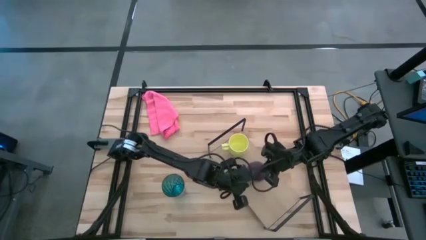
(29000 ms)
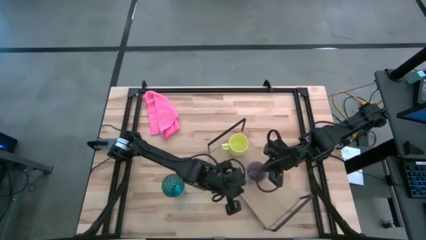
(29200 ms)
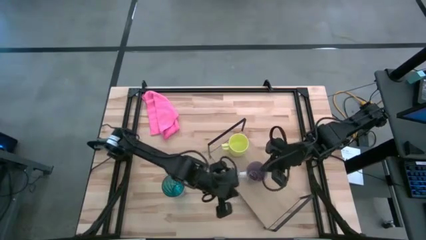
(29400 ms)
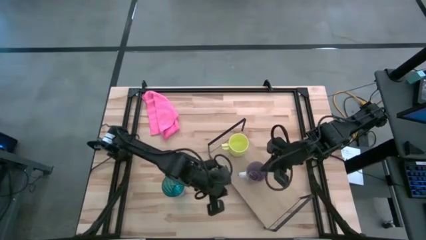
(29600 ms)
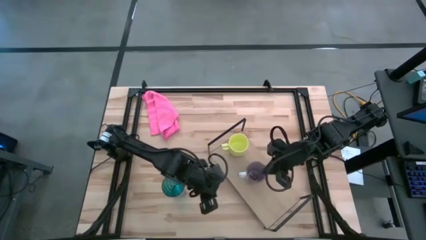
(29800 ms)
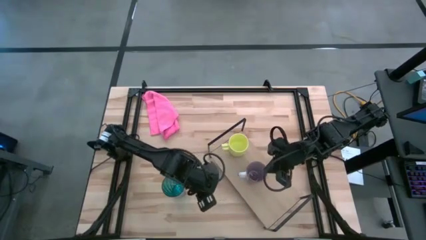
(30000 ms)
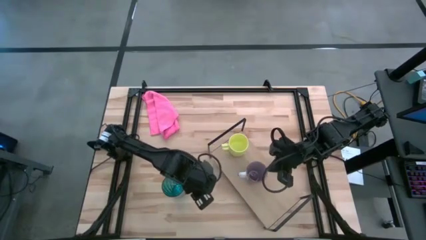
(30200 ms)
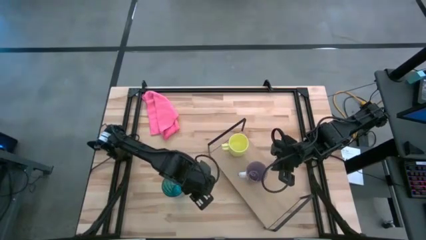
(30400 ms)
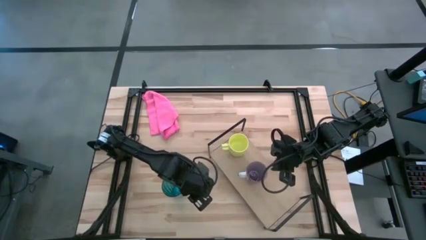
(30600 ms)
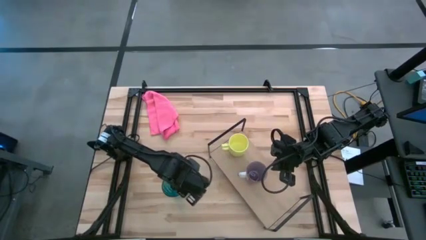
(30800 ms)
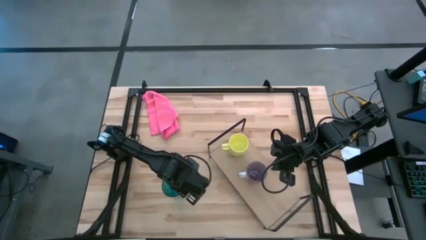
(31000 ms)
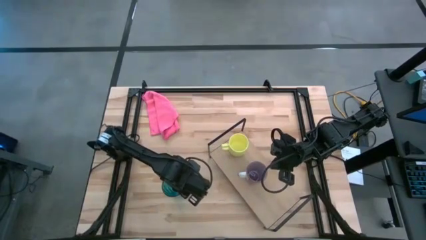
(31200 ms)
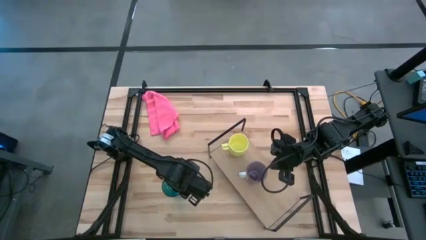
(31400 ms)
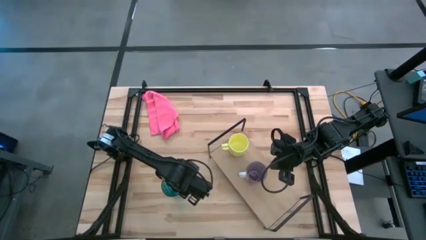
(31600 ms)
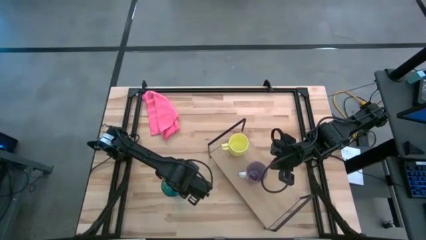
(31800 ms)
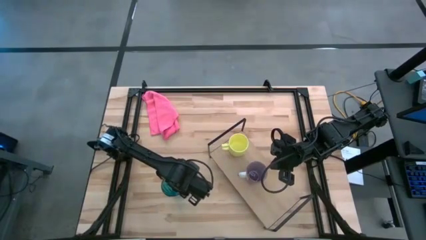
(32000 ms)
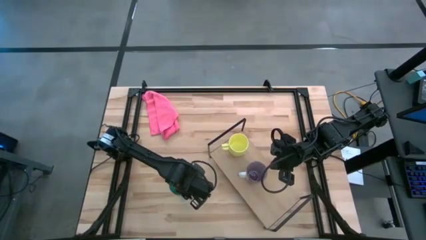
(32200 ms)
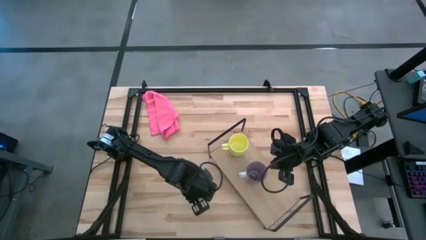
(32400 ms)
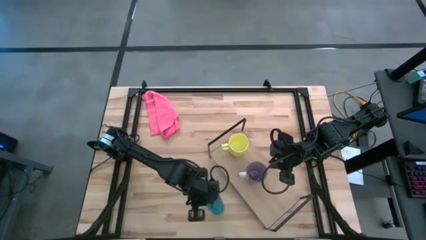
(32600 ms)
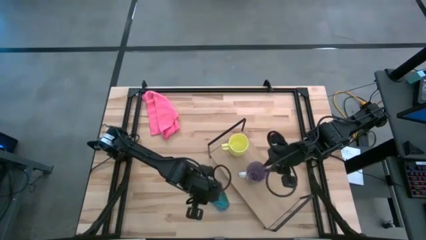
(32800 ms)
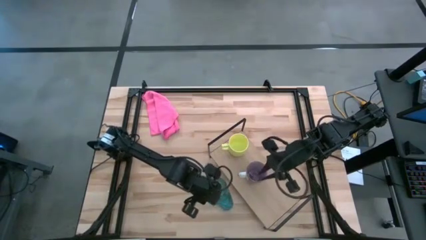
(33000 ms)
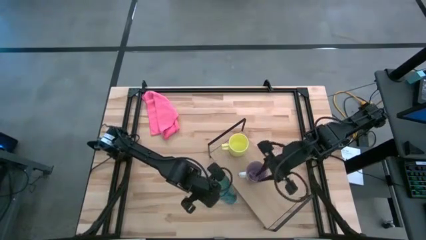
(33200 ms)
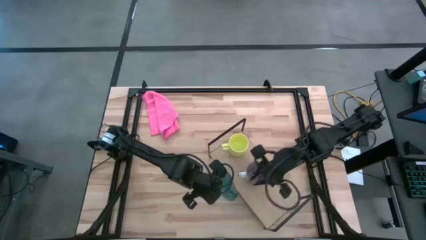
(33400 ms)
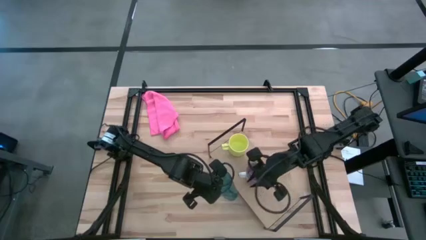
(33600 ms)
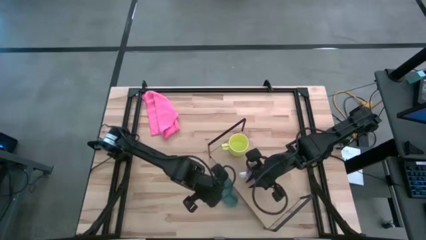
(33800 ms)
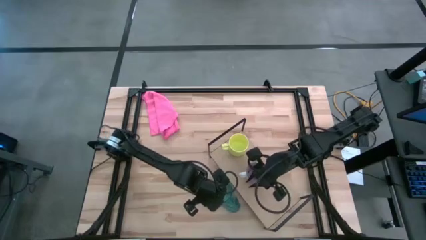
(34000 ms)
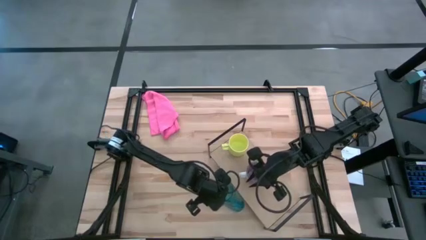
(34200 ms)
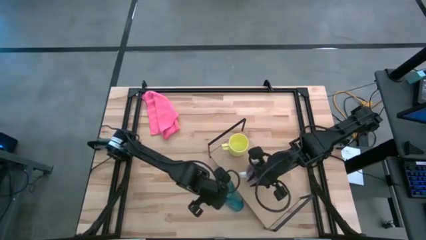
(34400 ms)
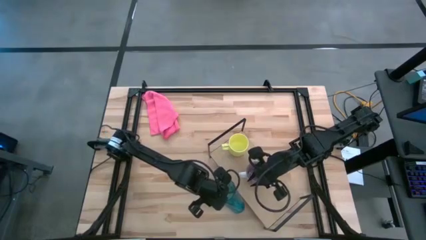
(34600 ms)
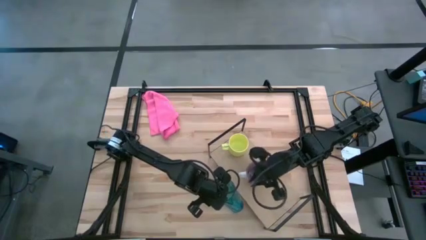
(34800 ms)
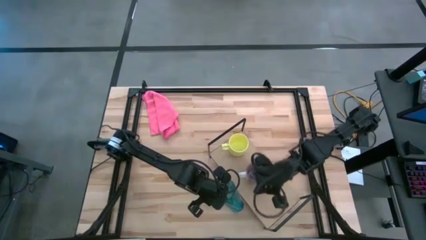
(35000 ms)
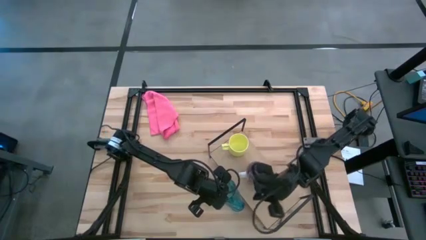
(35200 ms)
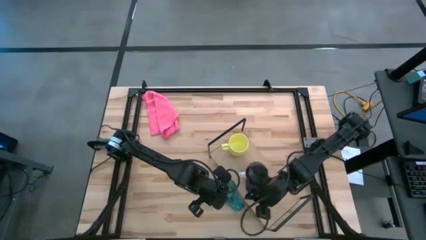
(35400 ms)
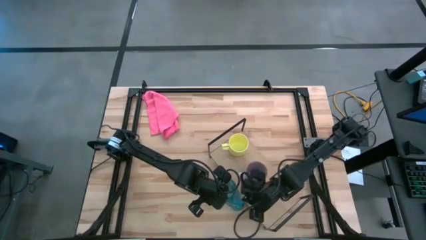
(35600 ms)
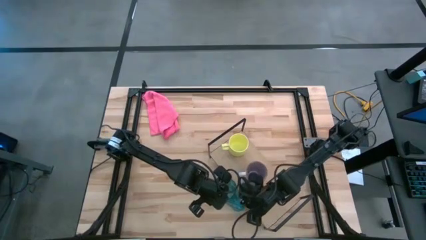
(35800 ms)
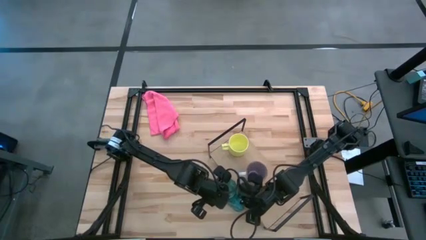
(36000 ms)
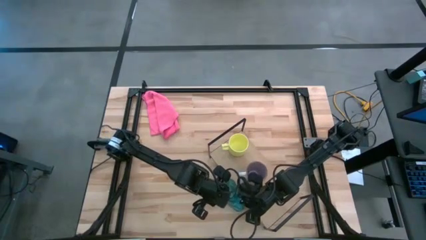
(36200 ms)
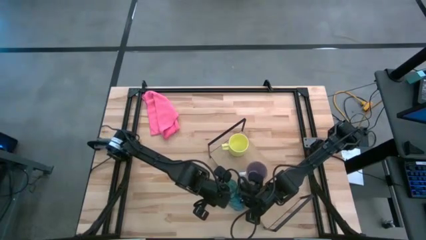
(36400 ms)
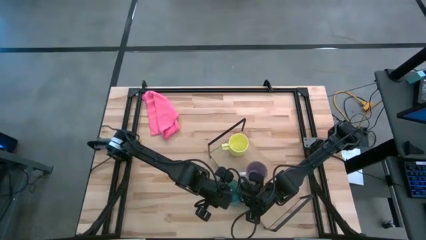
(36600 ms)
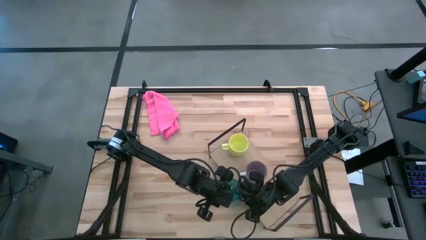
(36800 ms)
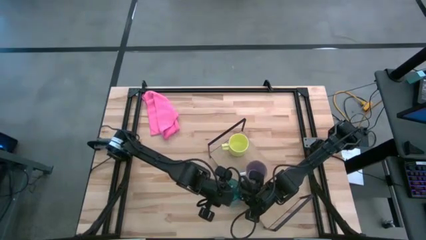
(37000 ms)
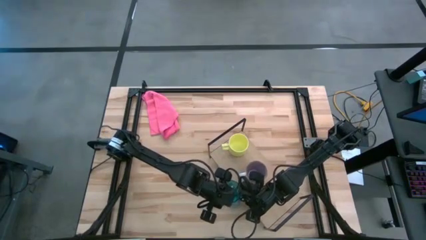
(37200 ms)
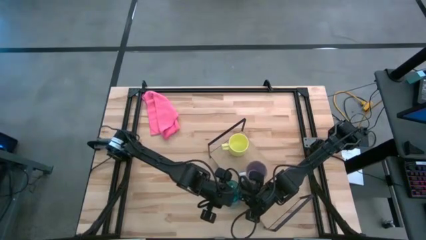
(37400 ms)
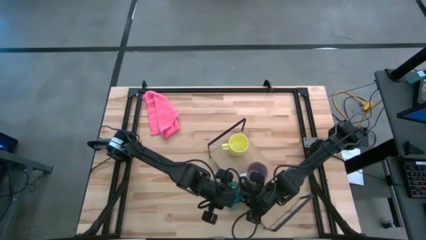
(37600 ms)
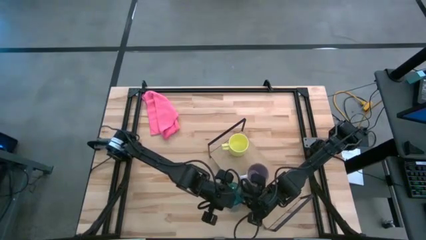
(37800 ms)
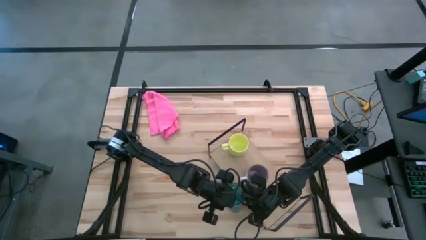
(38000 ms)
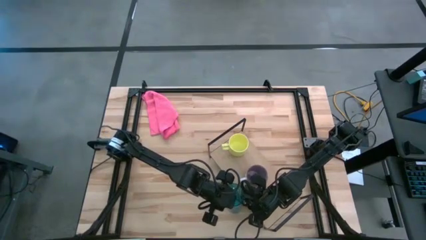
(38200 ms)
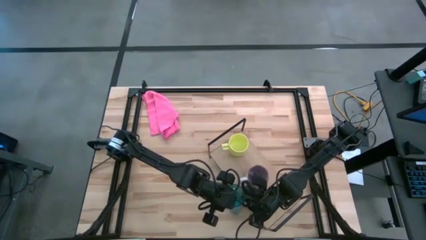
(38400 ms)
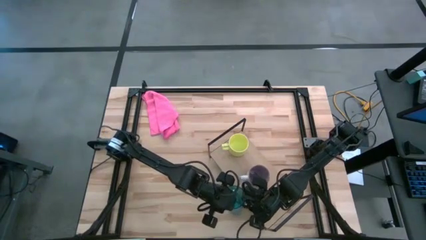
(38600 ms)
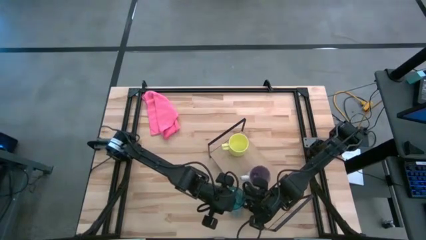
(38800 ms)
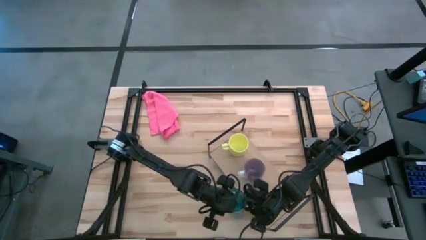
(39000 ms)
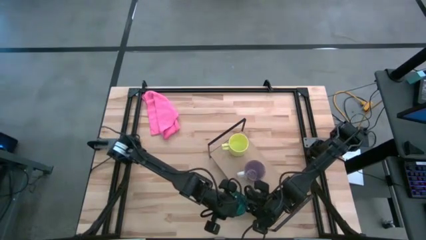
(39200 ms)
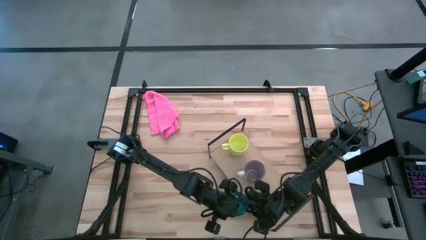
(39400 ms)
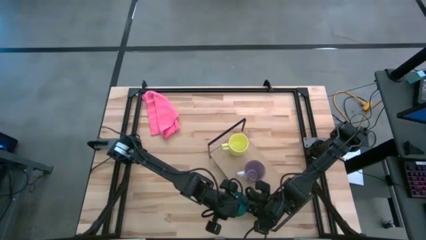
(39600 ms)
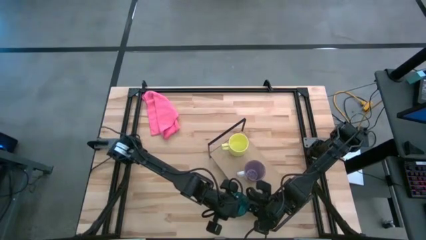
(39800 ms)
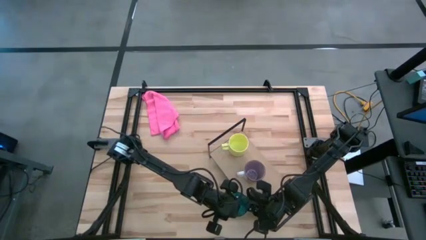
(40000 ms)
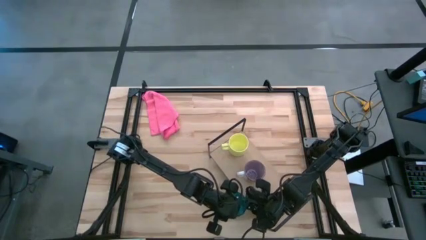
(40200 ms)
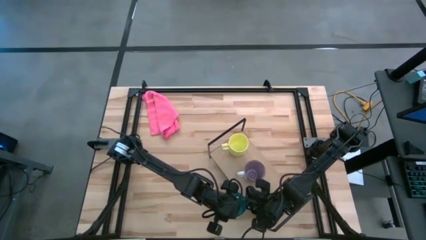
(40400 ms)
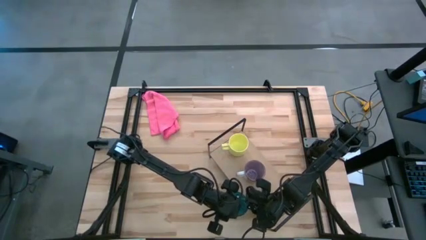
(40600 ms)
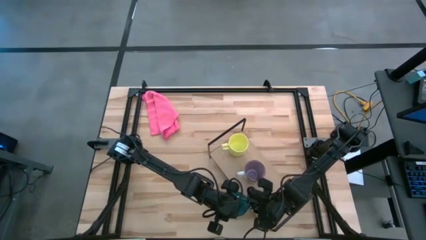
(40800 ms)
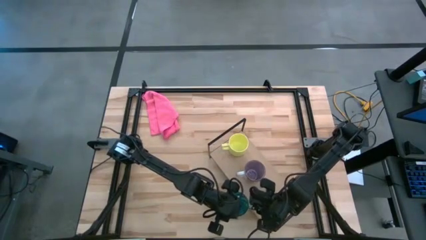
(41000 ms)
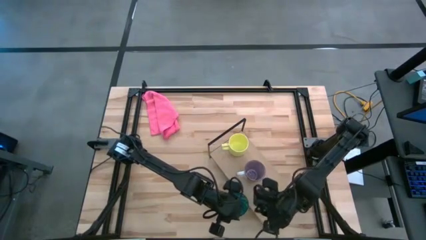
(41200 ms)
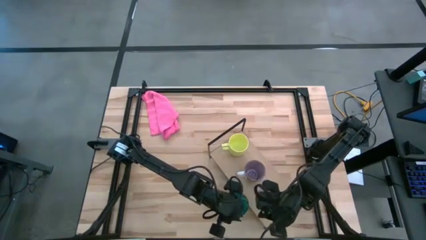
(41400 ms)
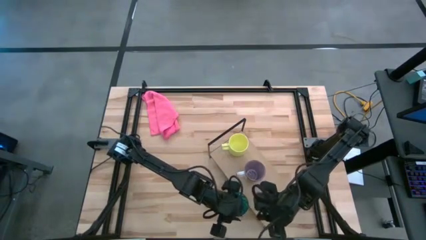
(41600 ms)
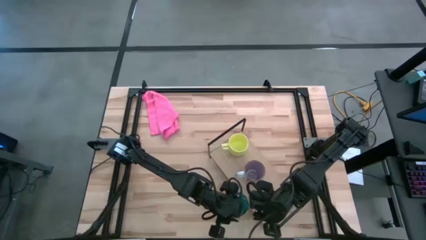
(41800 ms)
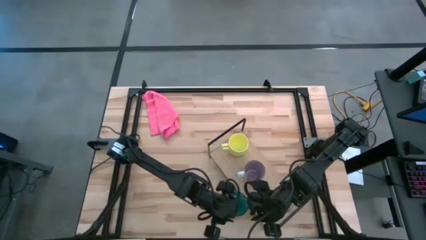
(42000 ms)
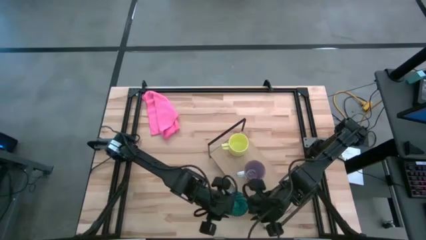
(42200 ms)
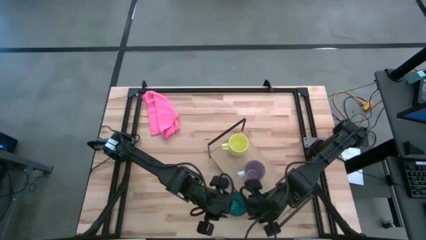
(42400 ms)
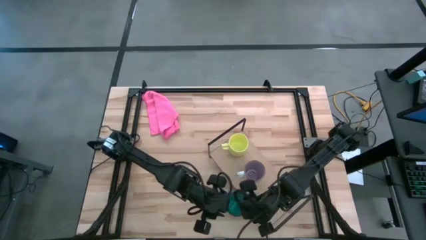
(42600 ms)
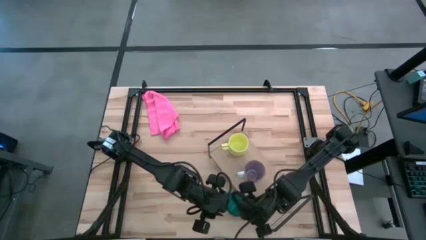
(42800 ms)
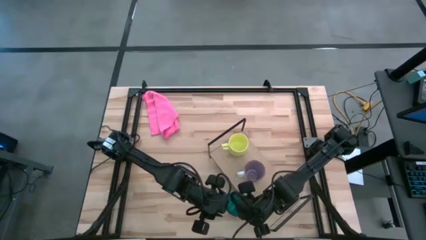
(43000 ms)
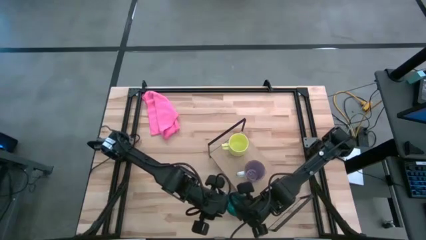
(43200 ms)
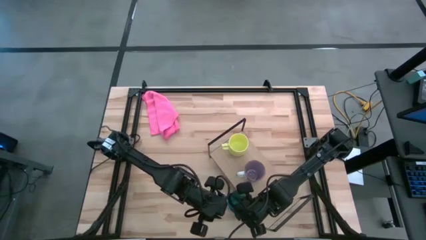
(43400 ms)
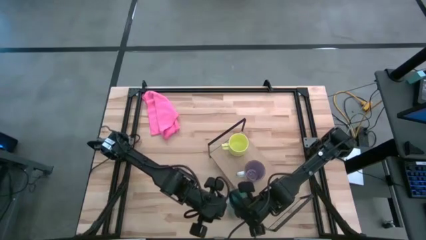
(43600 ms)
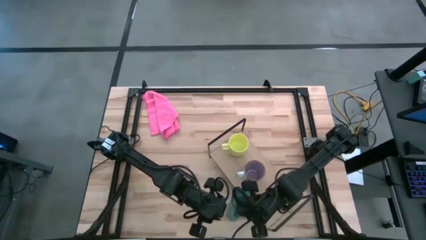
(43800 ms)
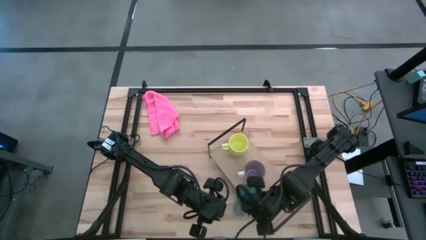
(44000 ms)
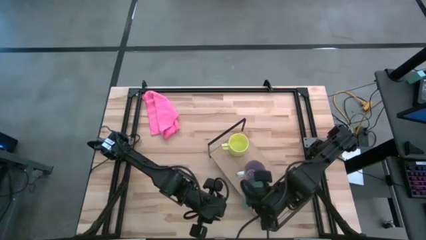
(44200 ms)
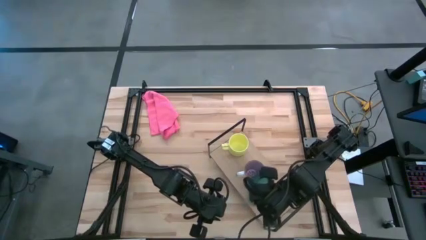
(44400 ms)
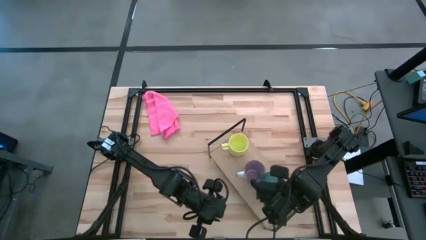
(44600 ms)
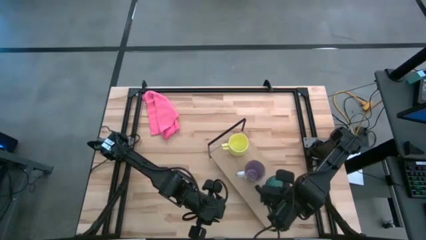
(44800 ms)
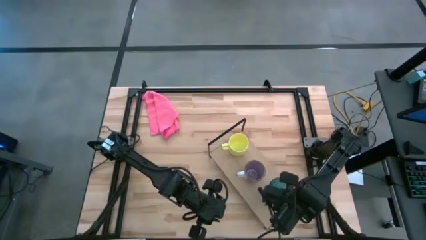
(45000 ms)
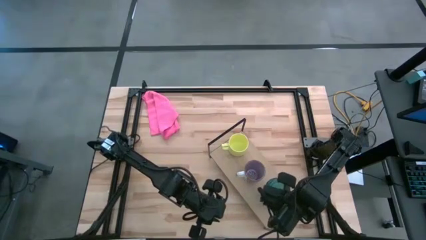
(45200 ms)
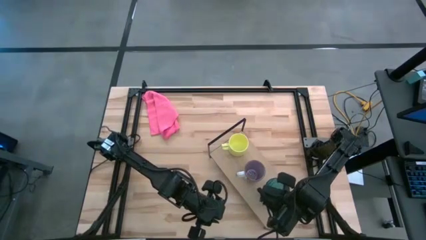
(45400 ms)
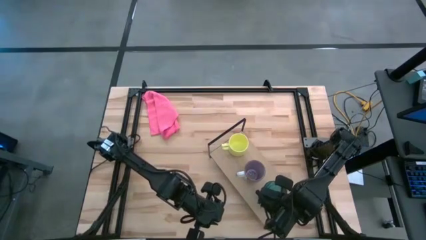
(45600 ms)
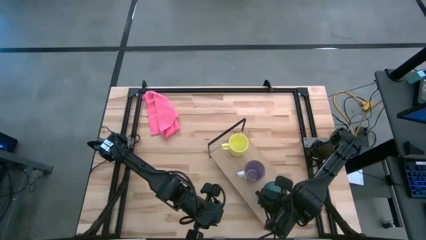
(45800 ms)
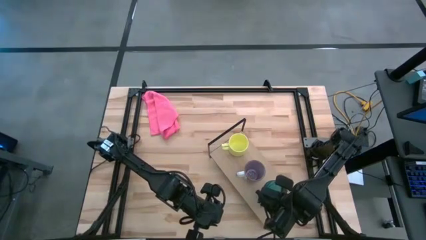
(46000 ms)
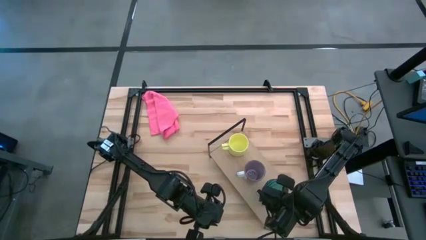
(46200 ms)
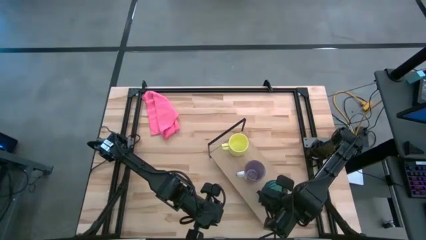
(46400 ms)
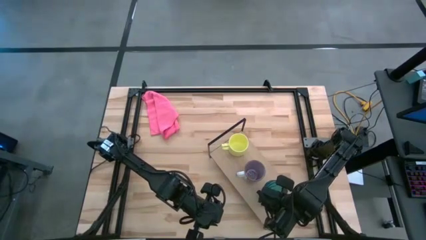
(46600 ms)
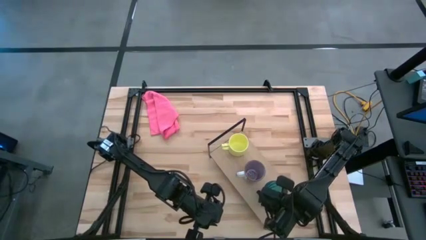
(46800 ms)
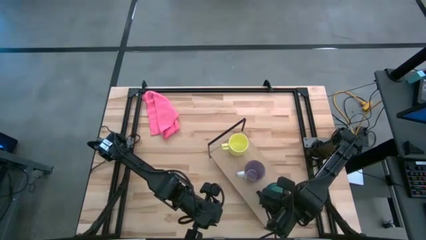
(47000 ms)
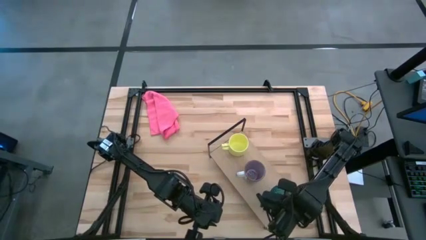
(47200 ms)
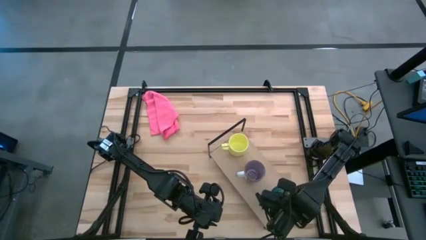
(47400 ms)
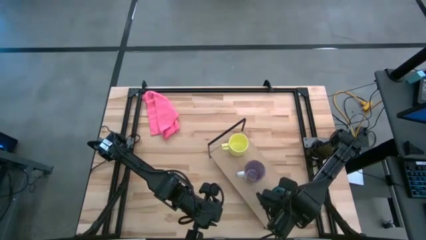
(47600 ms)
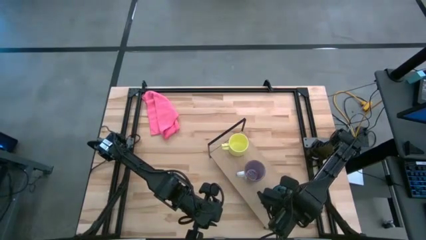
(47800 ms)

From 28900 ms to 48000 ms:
Task: Stack small to large cups/mugs on shelf
Put the blue glass on the shelf
